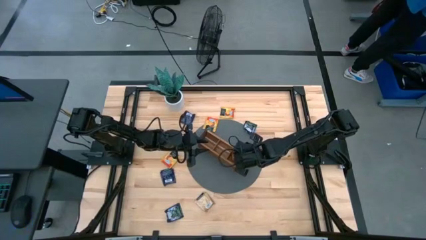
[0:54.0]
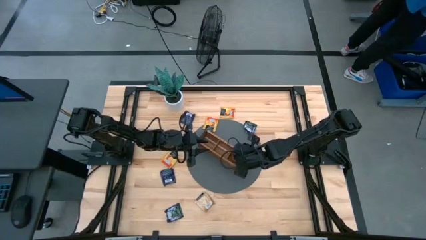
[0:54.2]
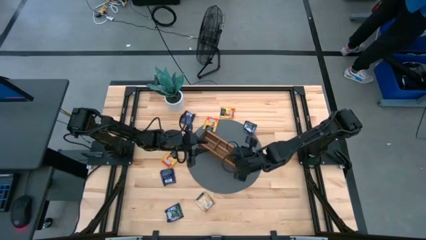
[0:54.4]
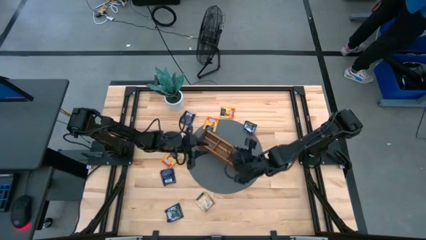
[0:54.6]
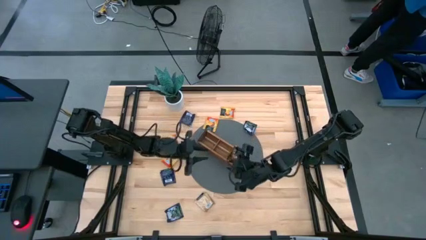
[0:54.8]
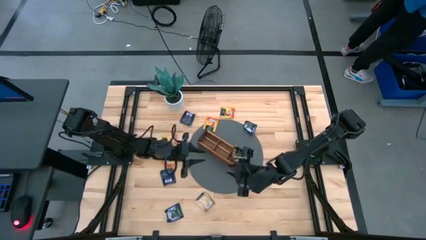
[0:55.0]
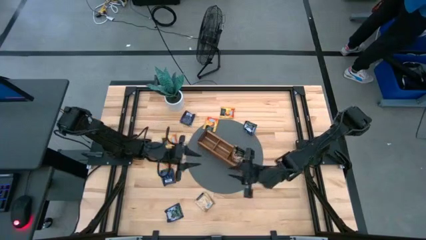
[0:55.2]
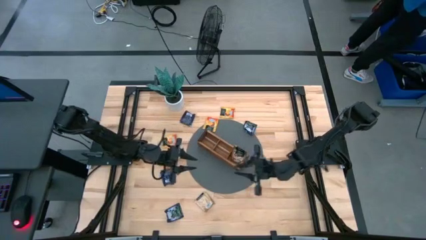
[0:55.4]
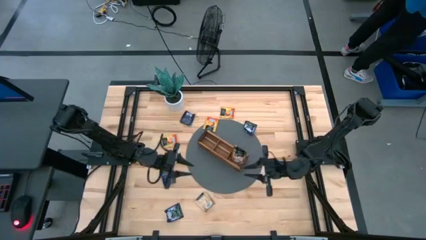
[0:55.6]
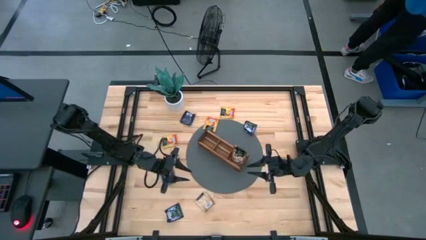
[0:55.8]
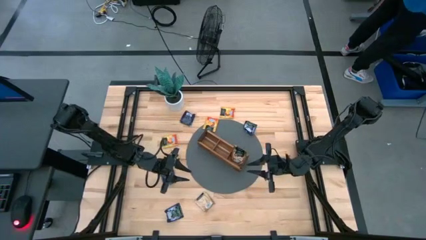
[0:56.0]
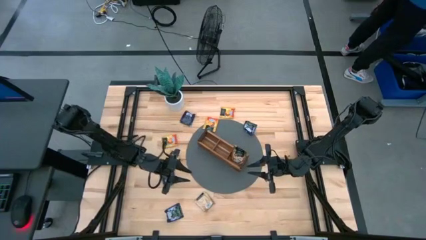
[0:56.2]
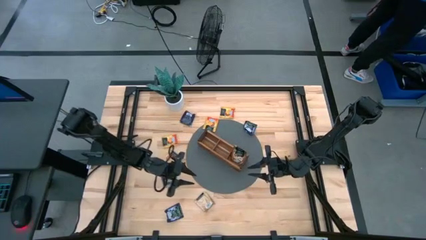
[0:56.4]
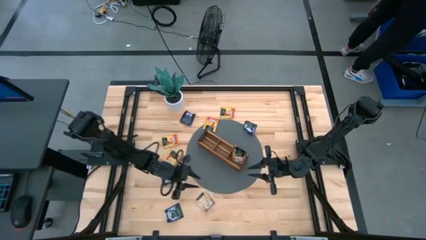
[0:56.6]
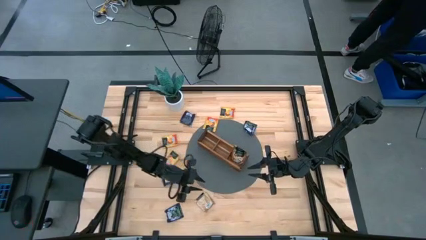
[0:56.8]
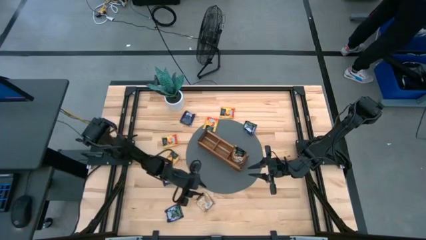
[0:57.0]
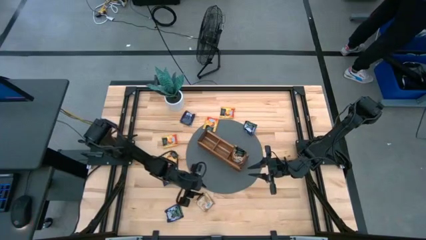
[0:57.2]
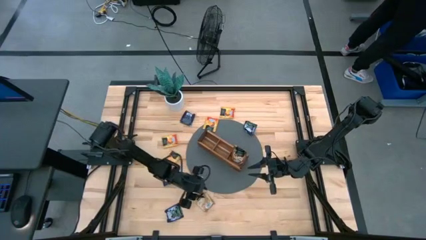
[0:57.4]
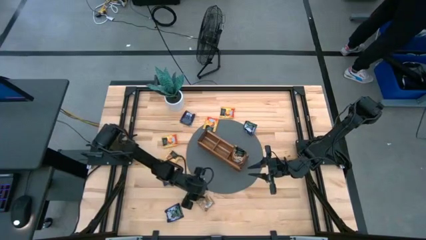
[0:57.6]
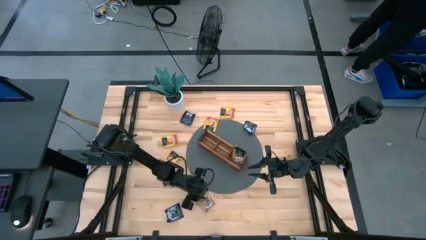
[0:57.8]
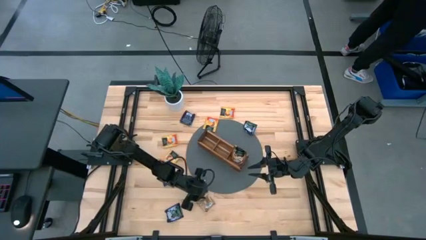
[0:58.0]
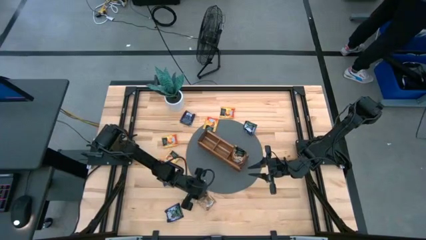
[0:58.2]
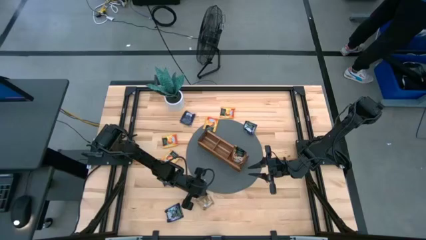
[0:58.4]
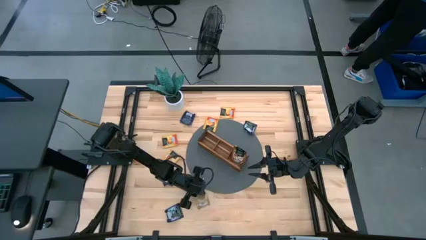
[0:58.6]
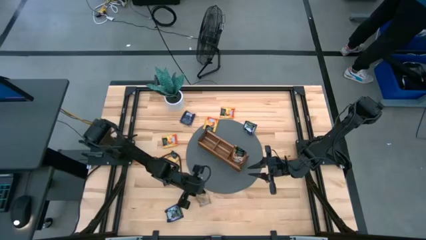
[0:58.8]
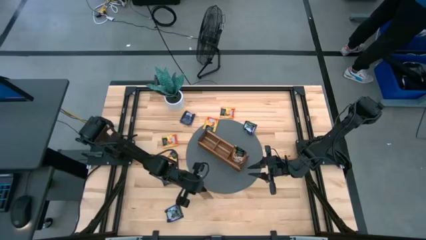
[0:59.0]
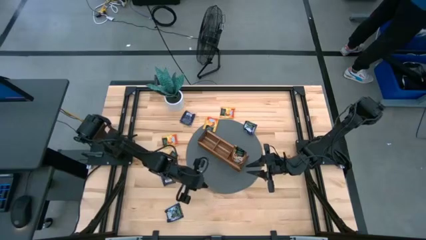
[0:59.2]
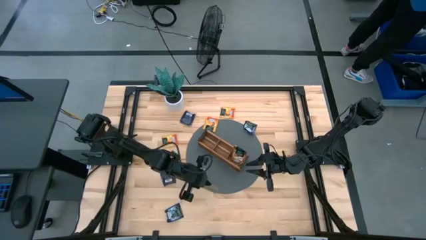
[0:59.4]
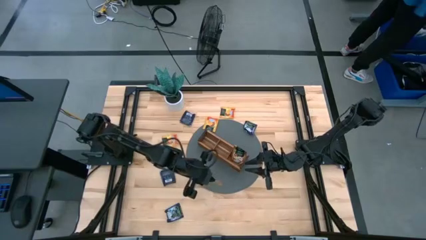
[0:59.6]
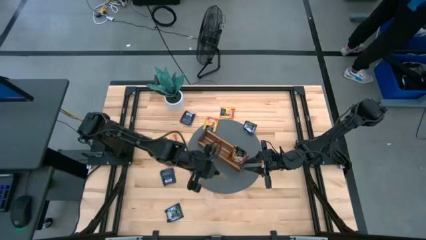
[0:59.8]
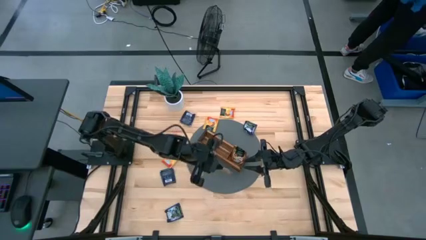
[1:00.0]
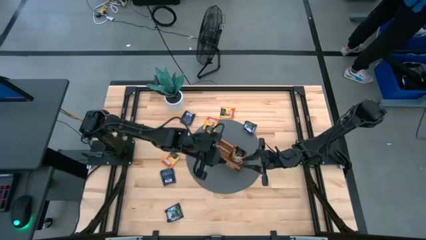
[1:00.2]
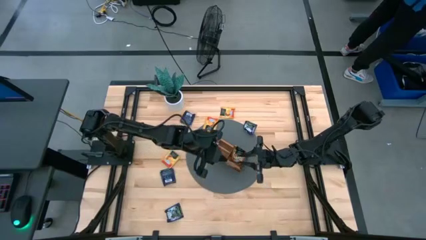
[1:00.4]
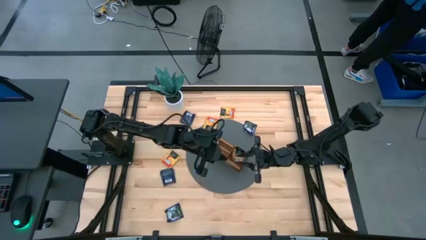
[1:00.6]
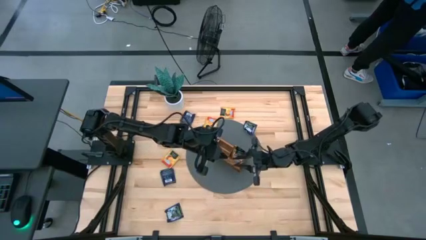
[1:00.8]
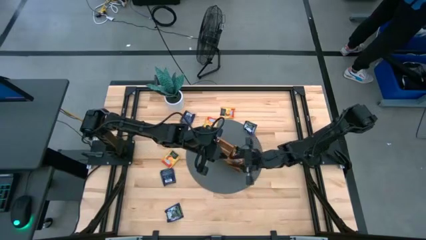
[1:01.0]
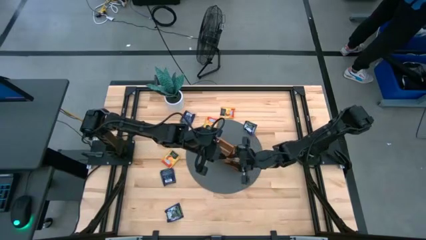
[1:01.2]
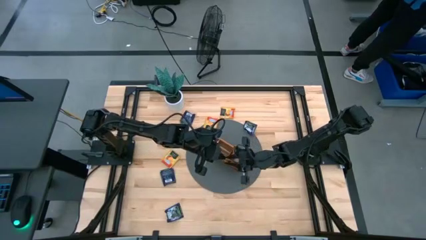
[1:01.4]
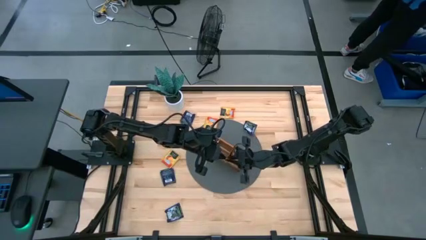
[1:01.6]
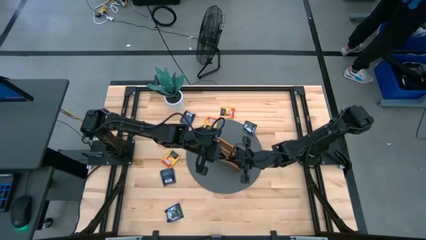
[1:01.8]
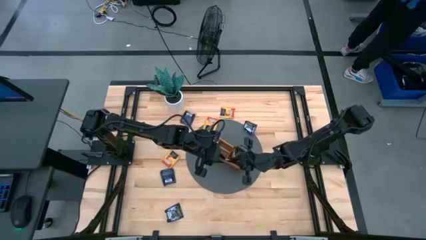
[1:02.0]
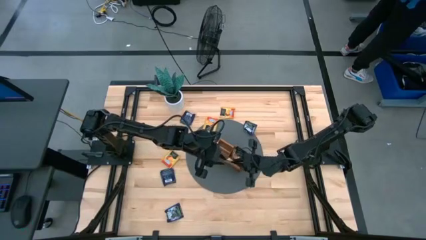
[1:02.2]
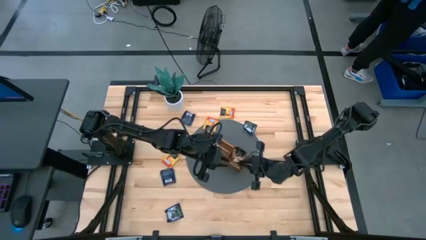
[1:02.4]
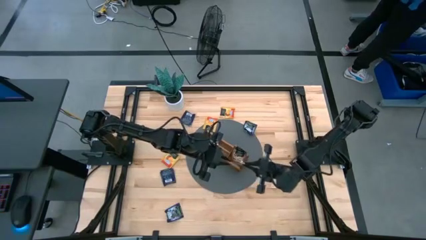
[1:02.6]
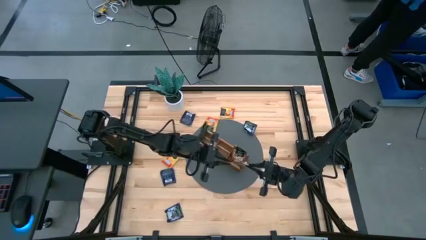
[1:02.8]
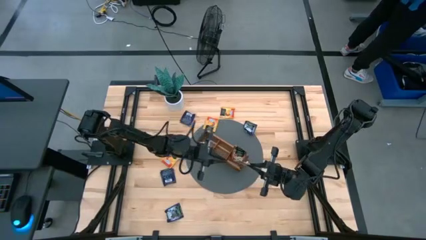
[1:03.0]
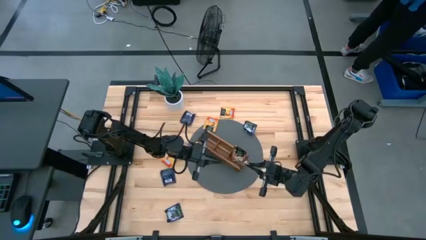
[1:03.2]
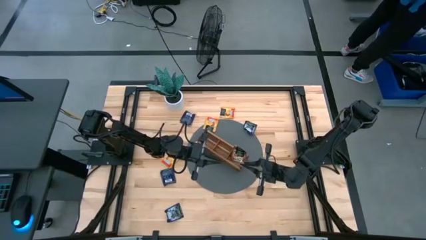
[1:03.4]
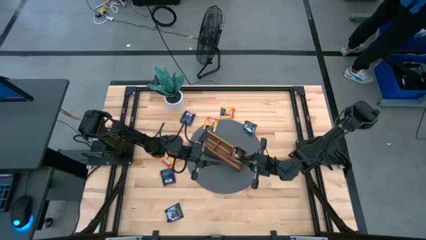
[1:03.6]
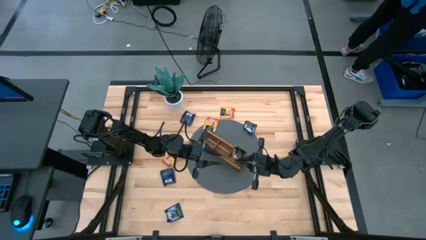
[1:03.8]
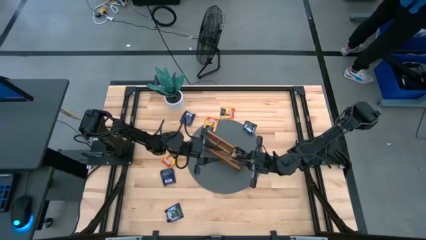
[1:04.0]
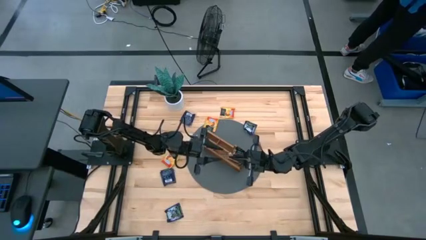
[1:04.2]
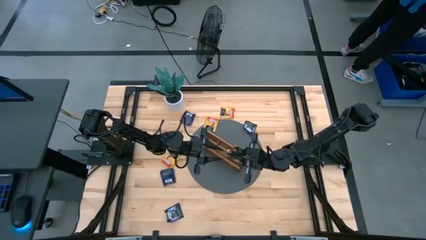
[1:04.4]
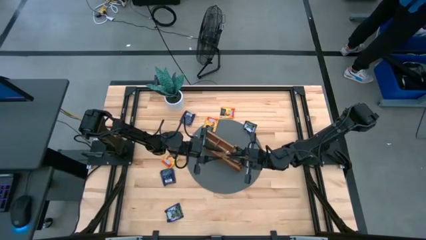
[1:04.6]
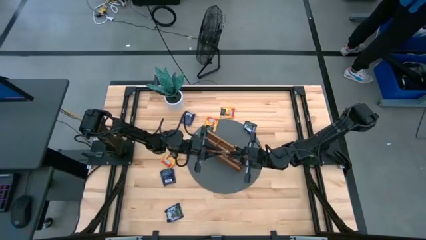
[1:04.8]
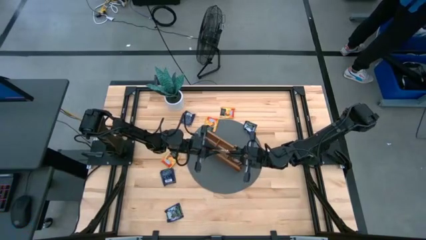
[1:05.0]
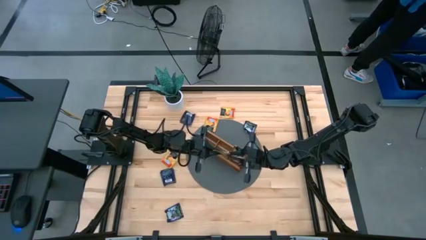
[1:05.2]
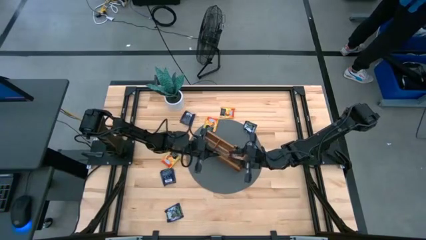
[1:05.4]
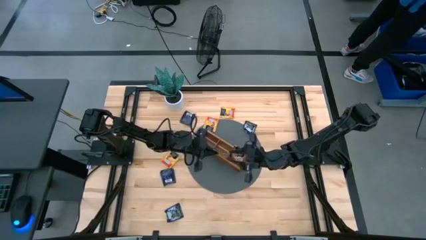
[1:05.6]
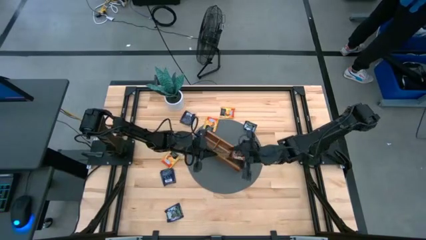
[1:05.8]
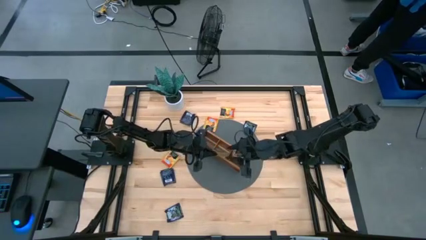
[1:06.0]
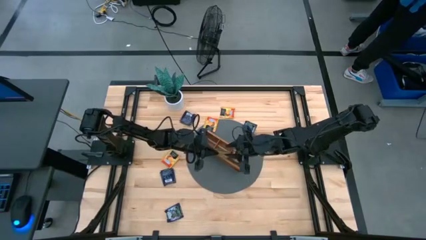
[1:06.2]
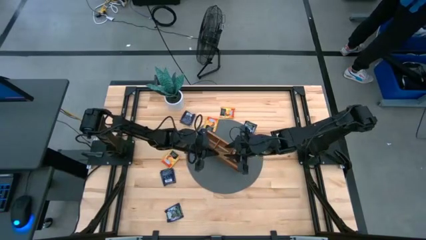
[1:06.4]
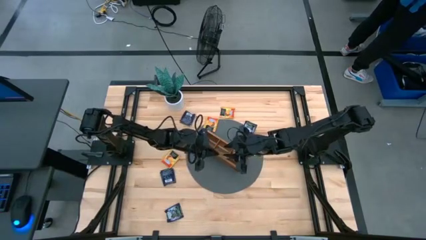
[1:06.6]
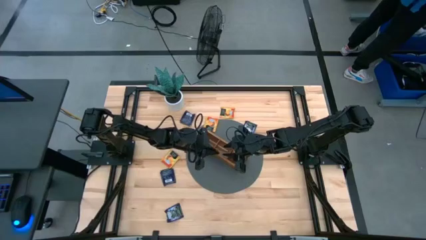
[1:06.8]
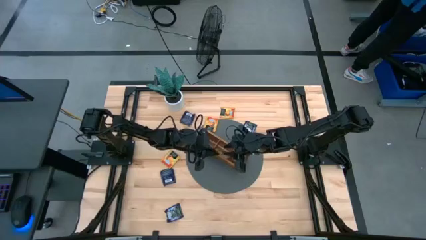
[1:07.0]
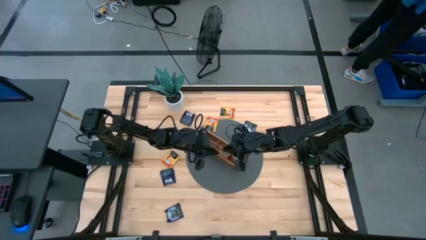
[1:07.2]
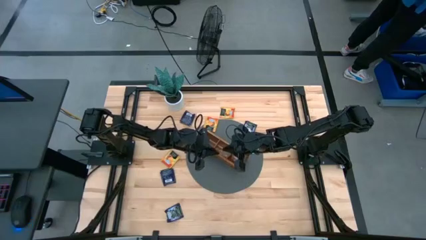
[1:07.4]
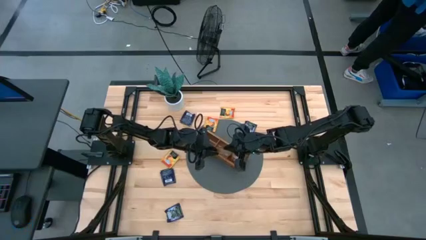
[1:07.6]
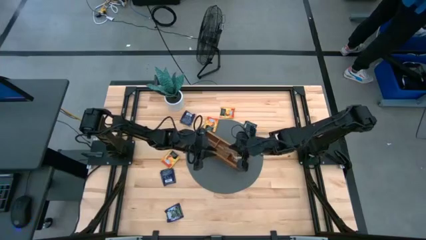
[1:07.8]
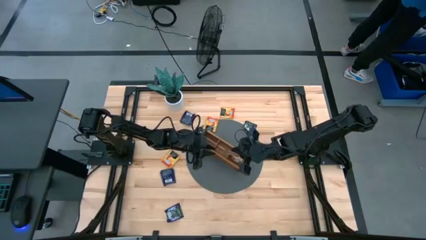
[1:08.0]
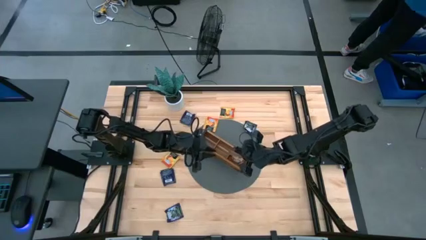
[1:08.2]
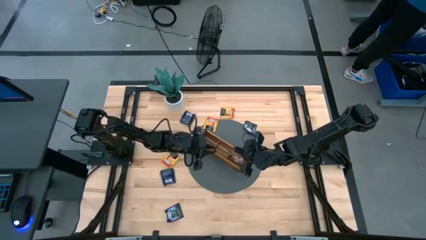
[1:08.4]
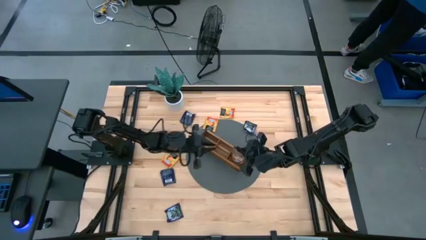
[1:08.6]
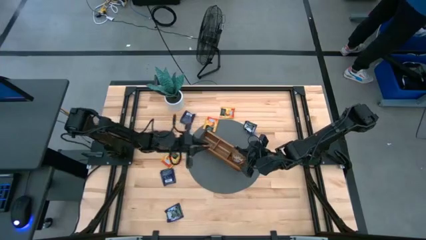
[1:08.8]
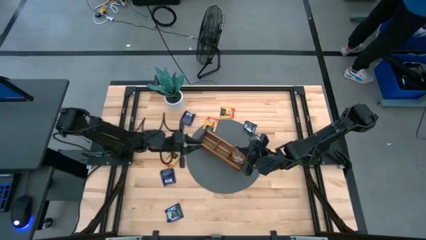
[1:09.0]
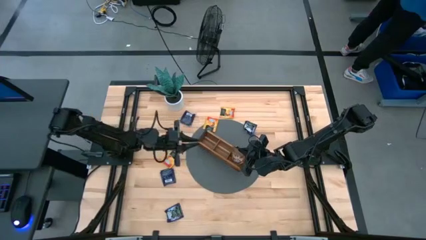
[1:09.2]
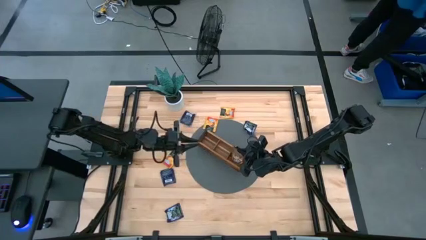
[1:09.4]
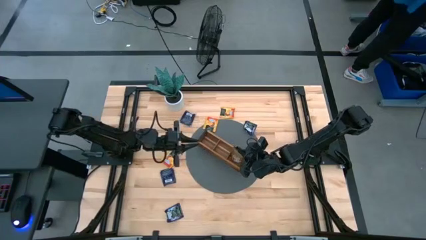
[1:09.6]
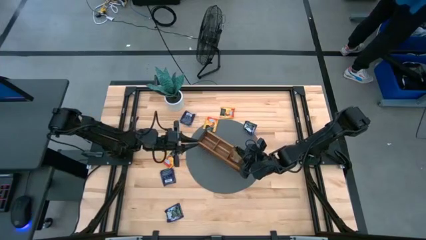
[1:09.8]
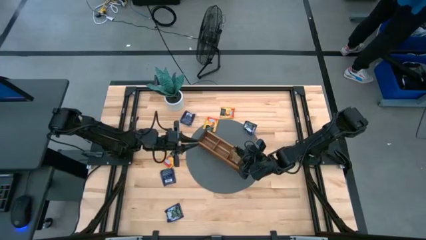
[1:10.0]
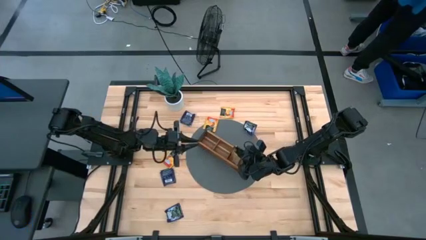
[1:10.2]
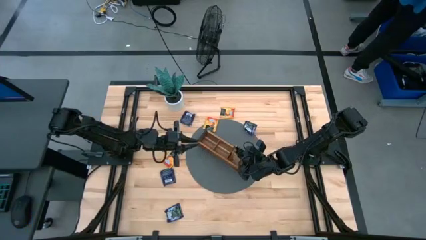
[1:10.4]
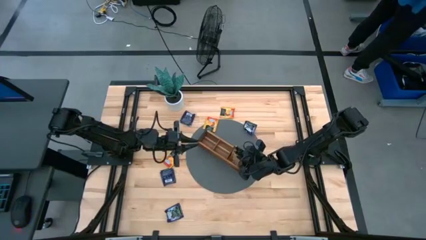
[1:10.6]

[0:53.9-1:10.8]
Task: Pick & Place Tea
Put the brown tea bag into the right section of the wooden organizer
